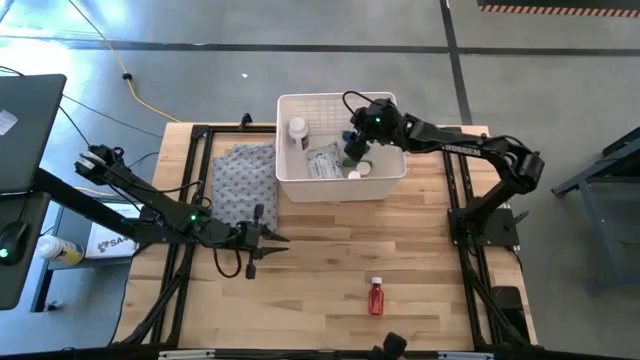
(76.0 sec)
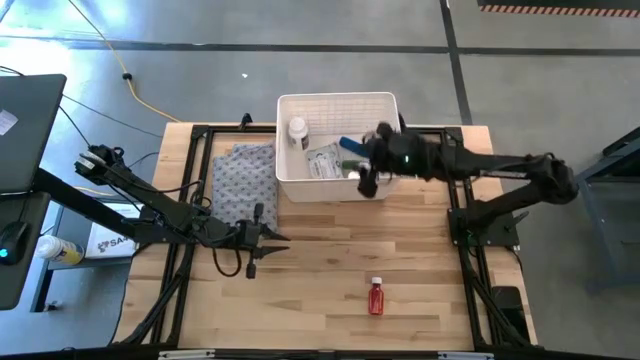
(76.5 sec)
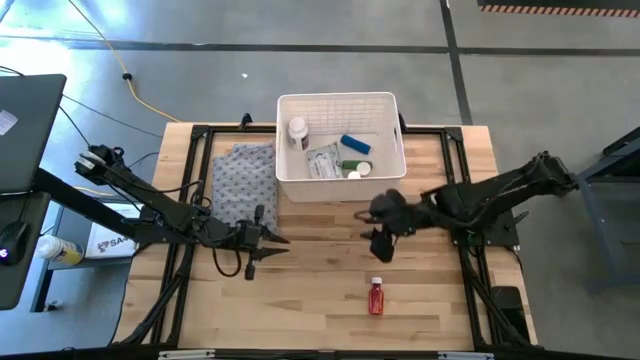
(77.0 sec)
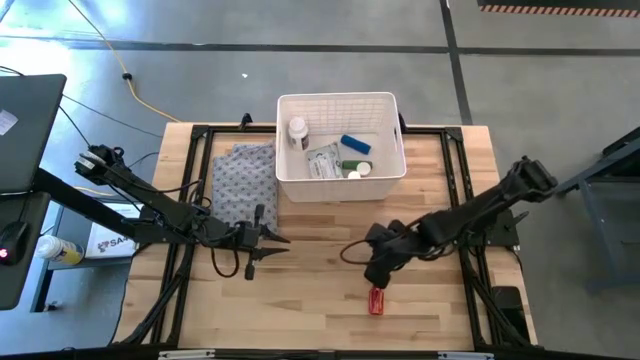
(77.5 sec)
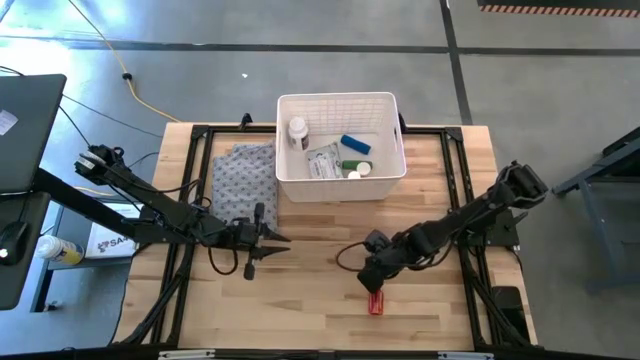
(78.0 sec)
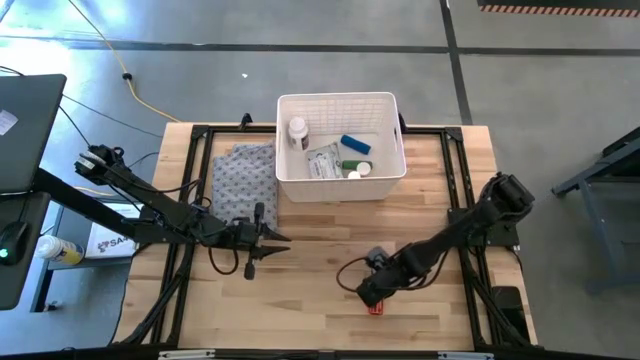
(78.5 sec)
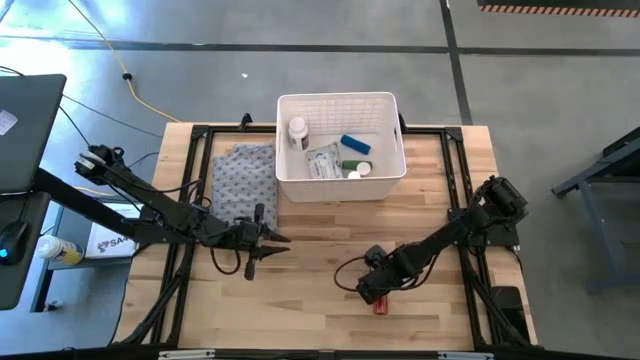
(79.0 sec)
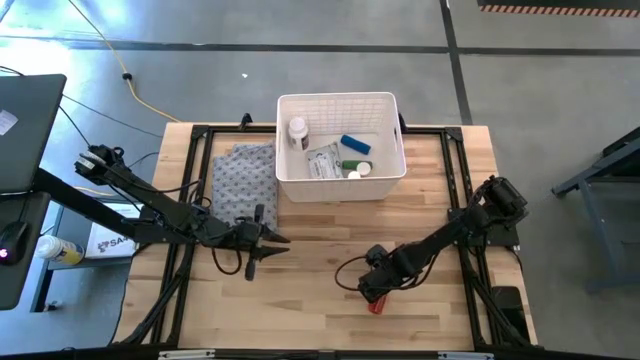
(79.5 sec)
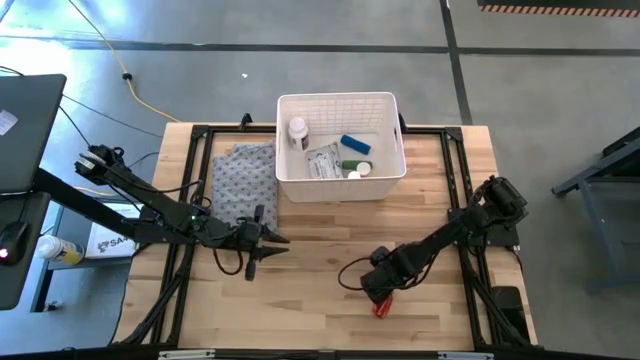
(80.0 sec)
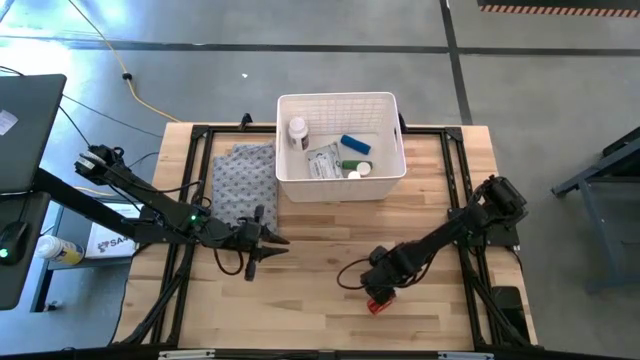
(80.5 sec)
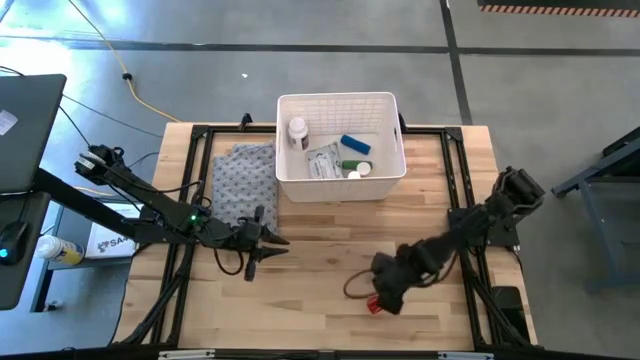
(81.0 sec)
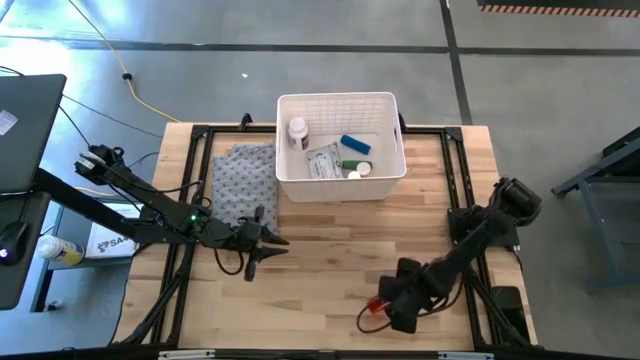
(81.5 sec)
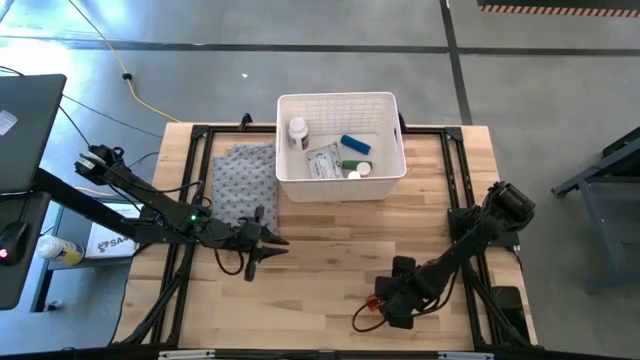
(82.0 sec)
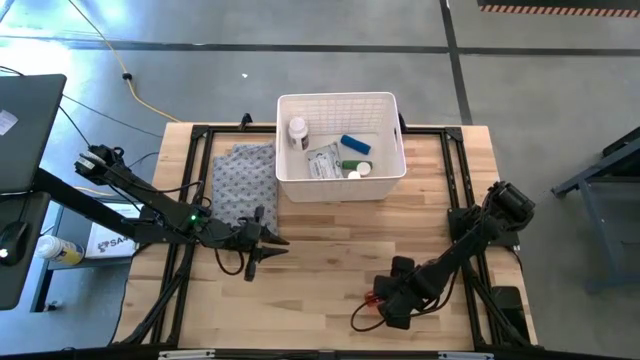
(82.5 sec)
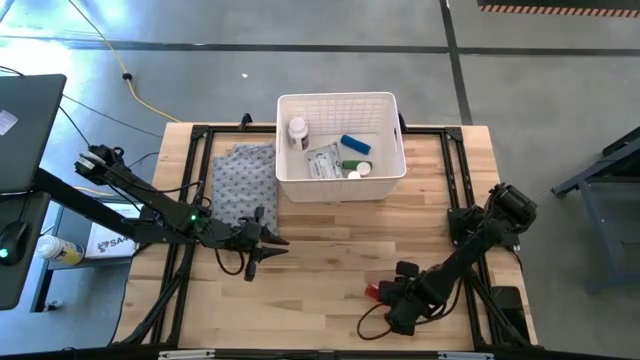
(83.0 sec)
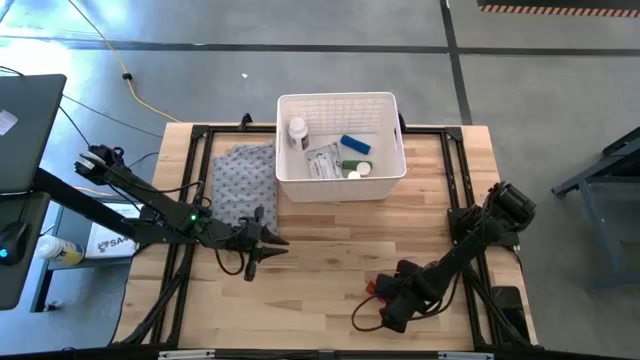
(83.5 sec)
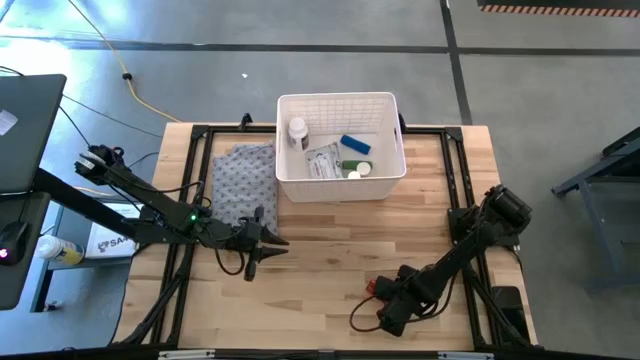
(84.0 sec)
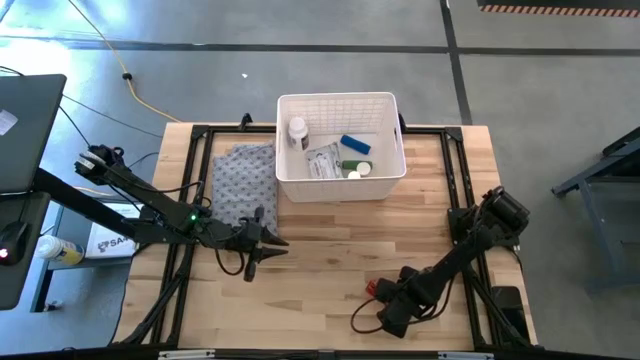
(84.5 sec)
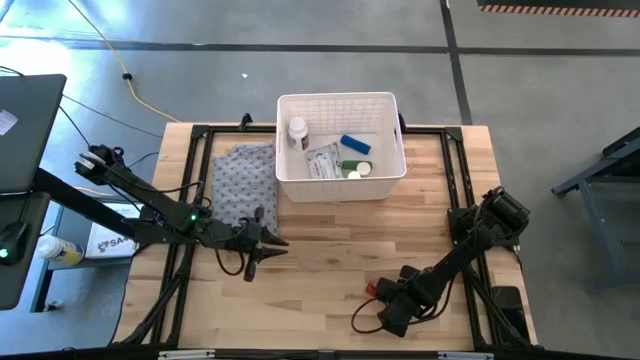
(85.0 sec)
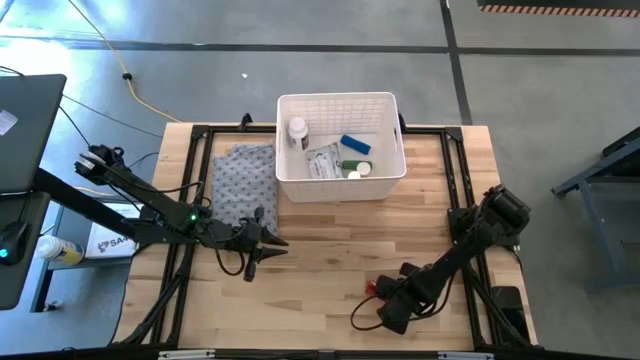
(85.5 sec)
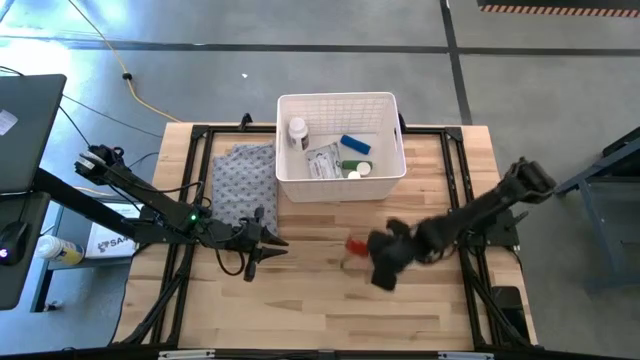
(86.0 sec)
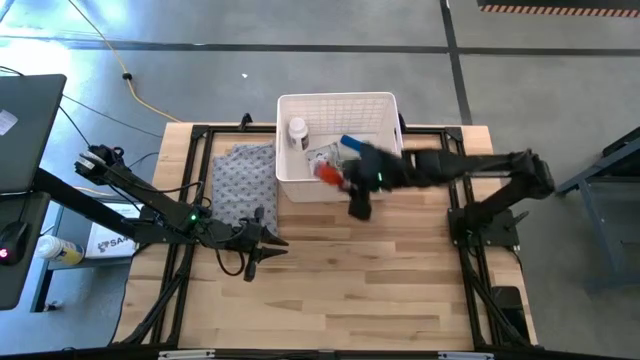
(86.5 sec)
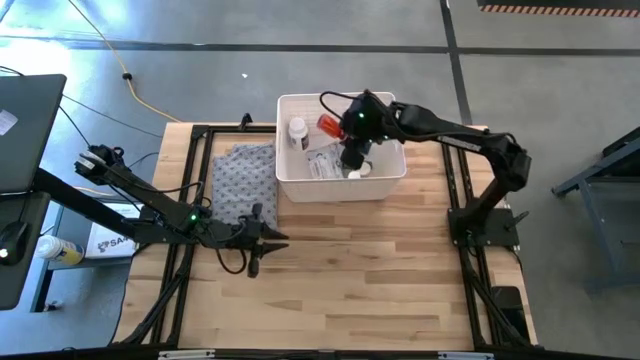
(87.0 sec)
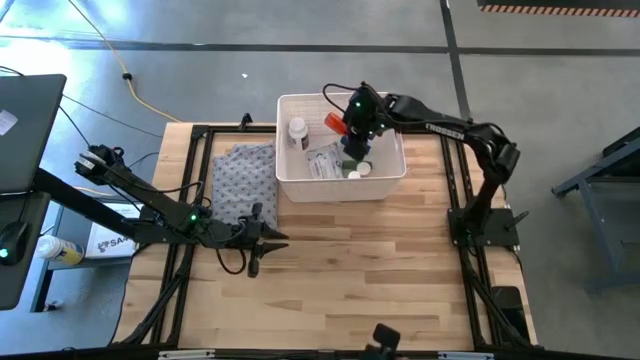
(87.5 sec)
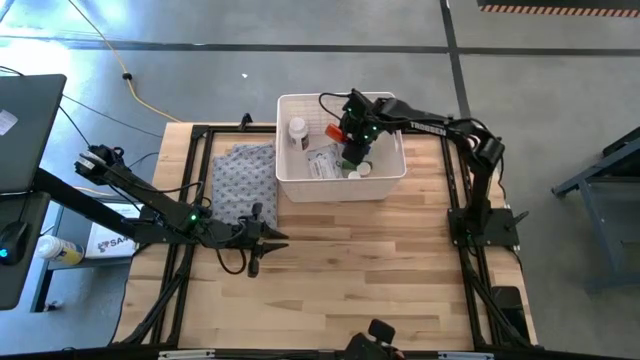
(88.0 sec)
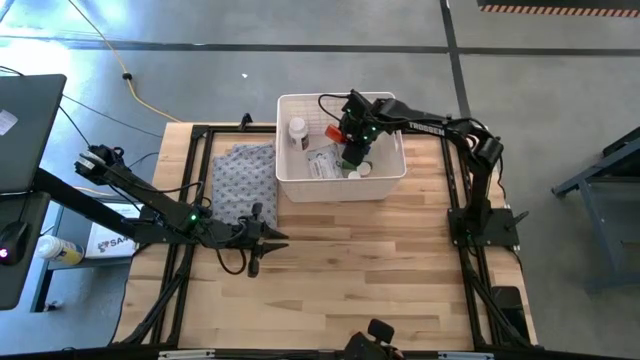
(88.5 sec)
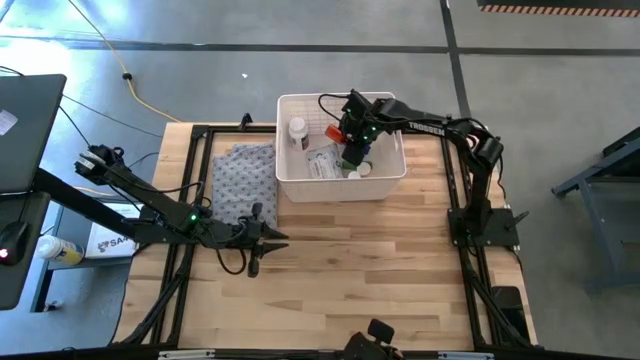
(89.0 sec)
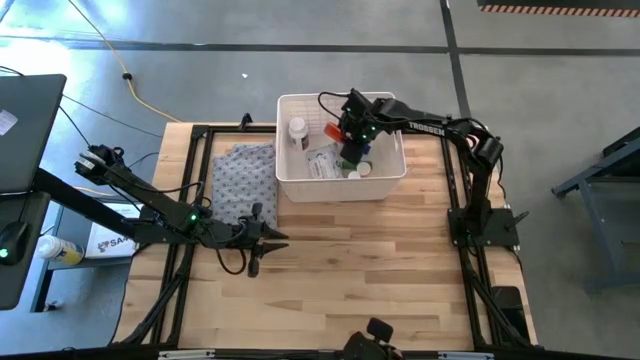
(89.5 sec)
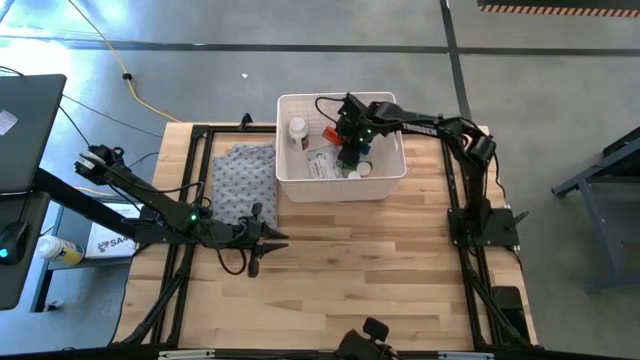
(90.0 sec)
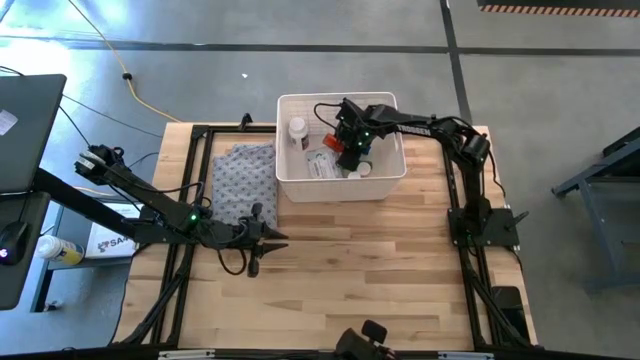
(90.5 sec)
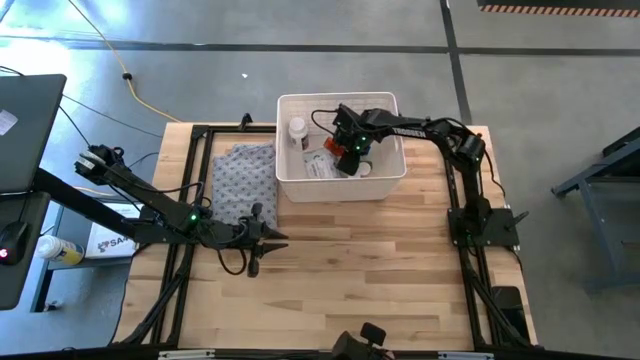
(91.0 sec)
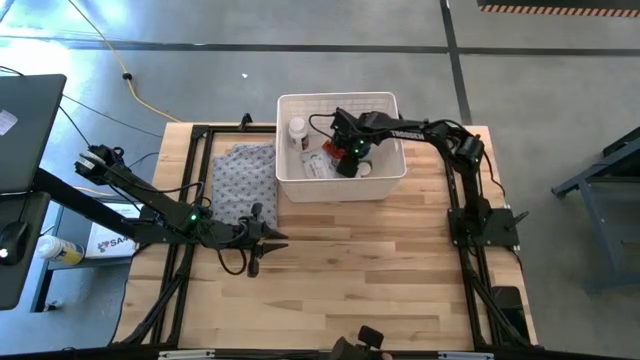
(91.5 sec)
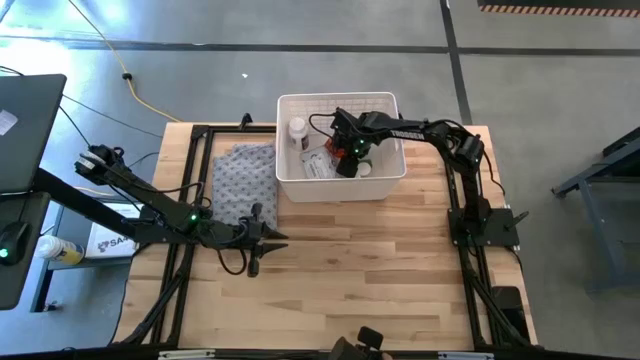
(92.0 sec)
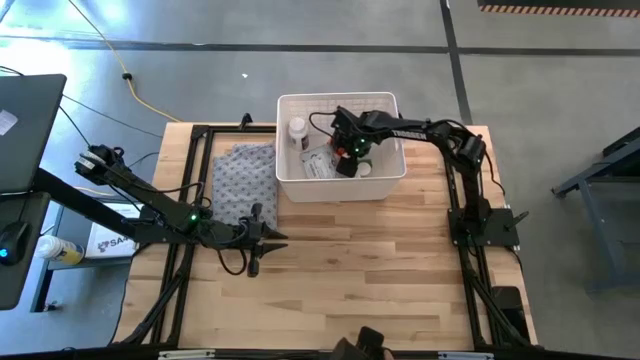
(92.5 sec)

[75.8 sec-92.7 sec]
Task: Pick & place medical supplies in basket/bin
Put the dark orange pill bottle into the white bin

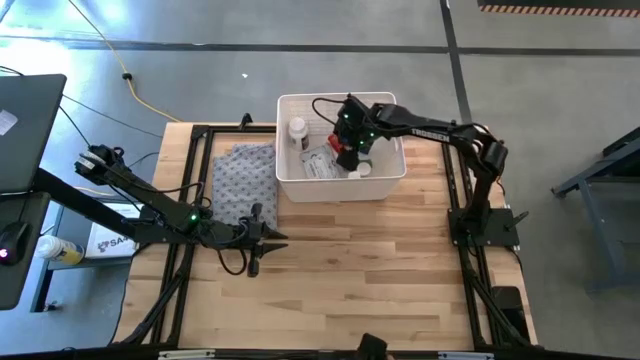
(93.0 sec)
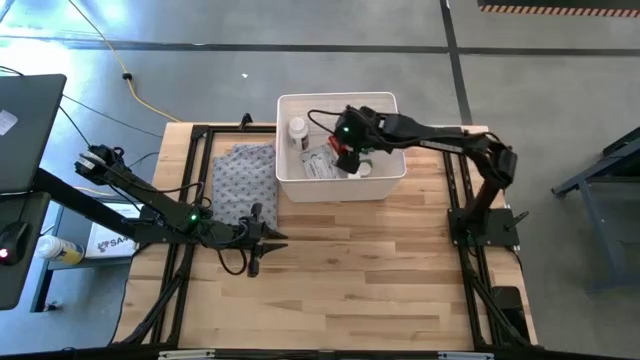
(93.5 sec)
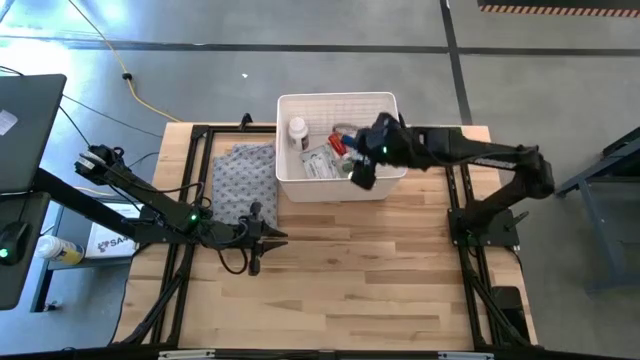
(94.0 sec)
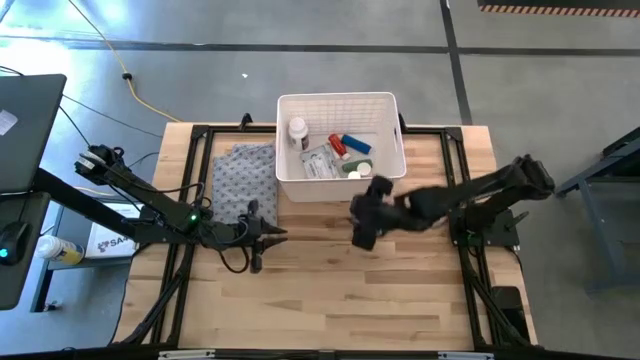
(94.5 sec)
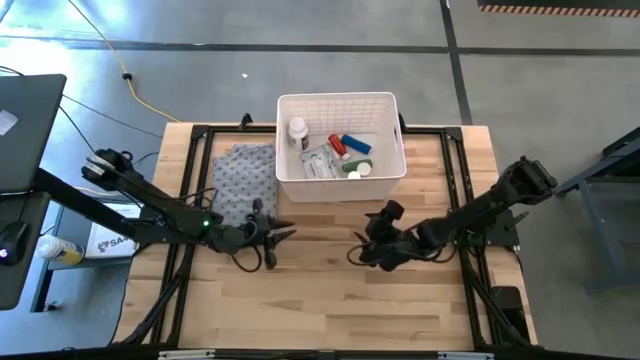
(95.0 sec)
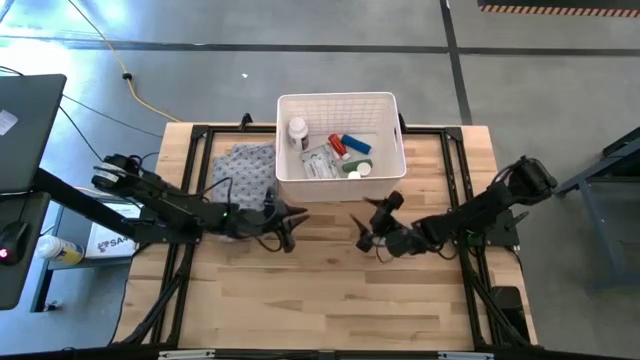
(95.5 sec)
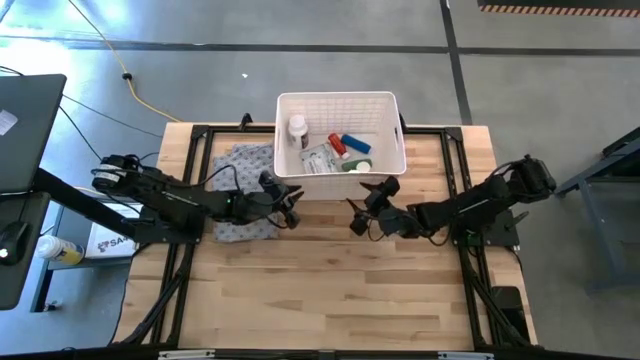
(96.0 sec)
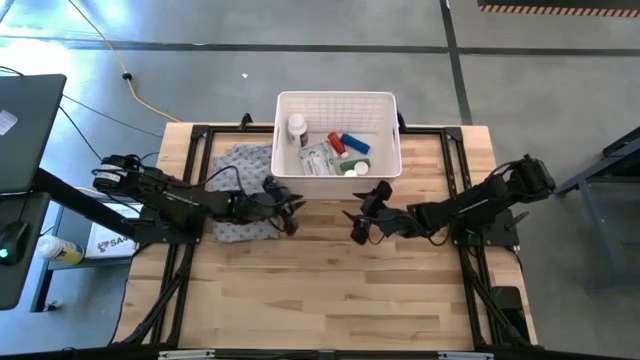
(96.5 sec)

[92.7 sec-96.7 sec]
Adjust the white bin

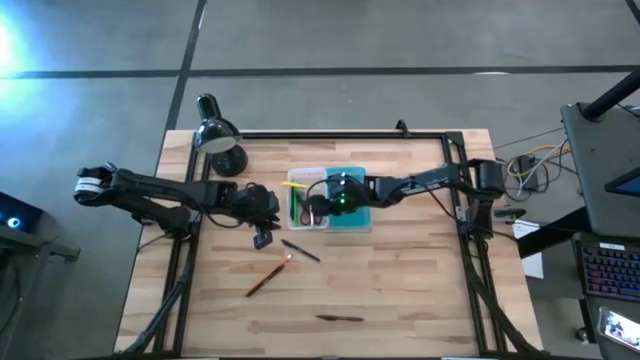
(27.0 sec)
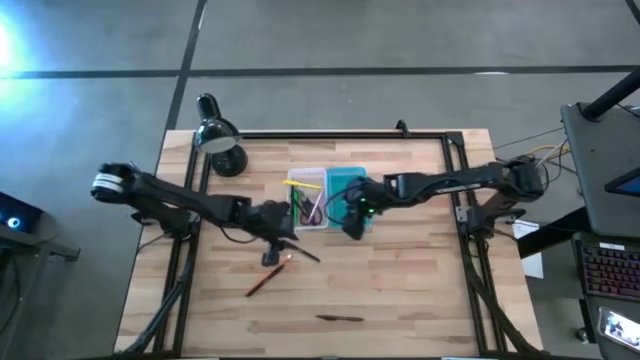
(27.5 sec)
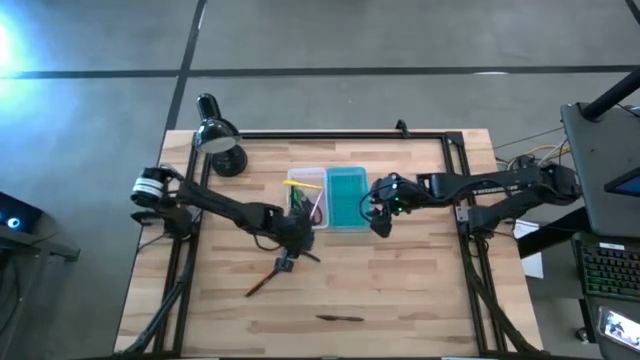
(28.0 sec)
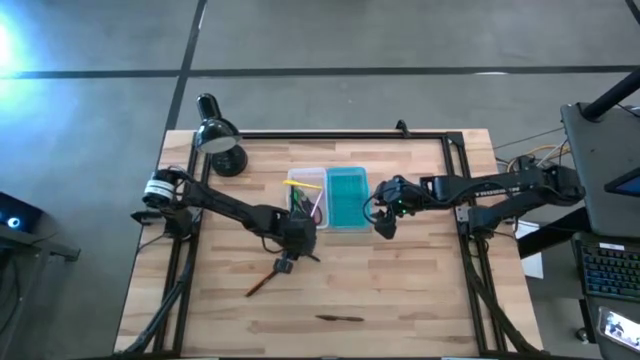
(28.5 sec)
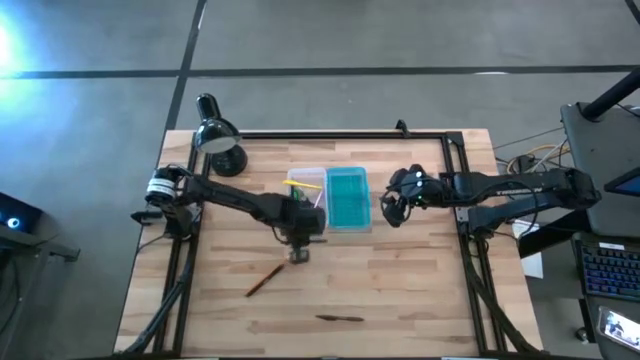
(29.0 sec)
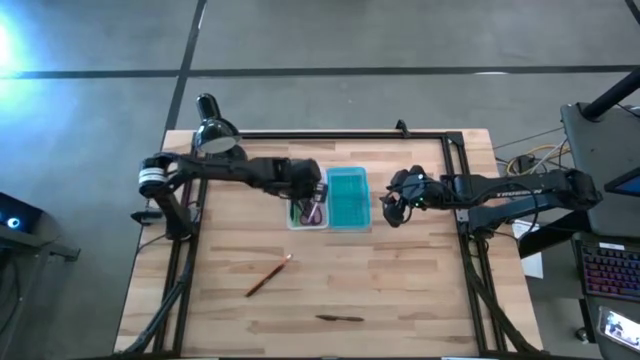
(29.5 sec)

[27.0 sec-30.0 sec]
Task: Pick & place school supplies into a supply box
Put the top black pen into the supply box
